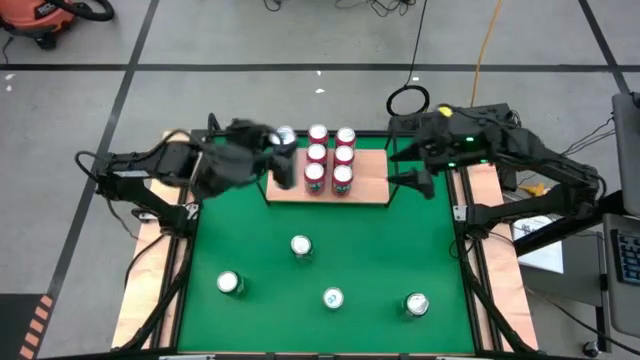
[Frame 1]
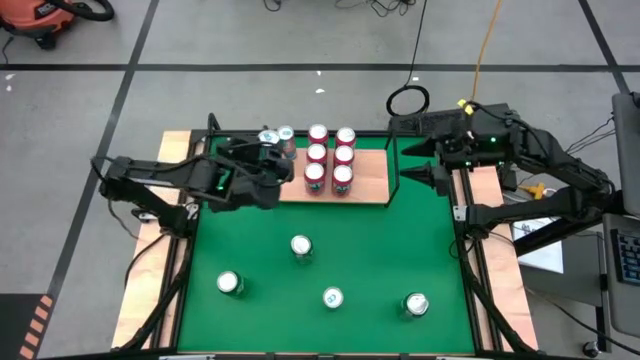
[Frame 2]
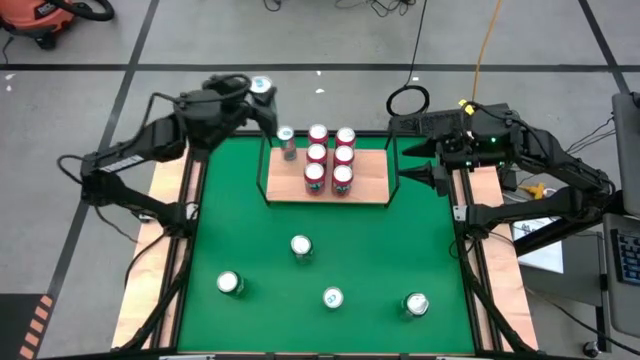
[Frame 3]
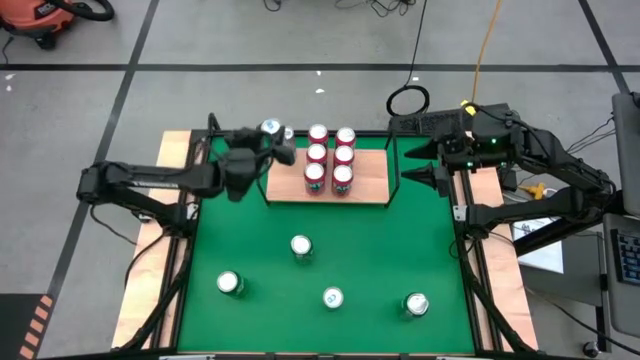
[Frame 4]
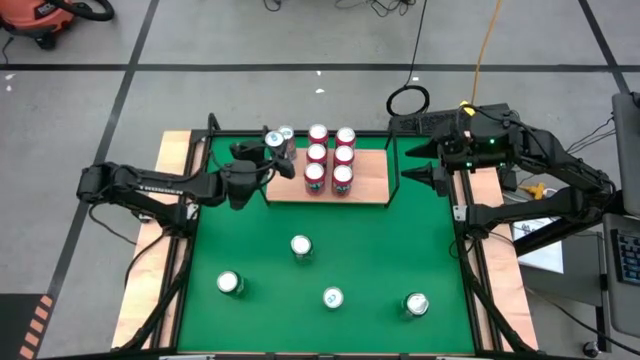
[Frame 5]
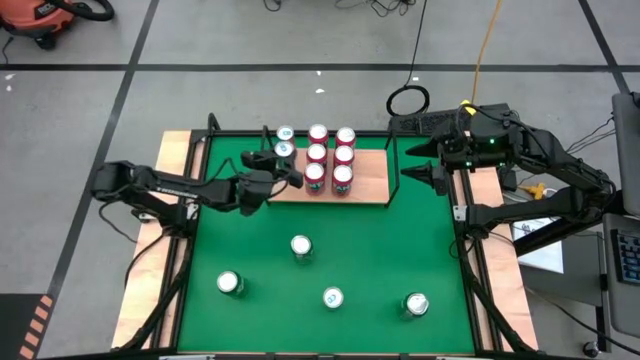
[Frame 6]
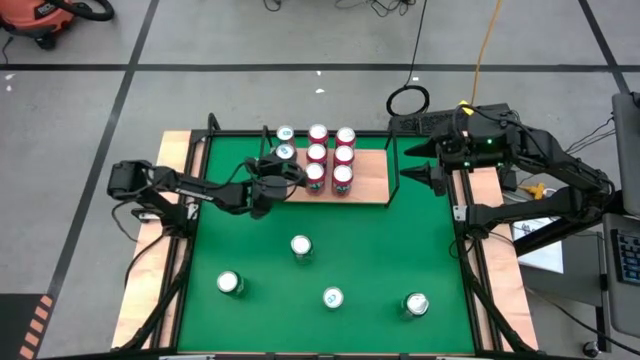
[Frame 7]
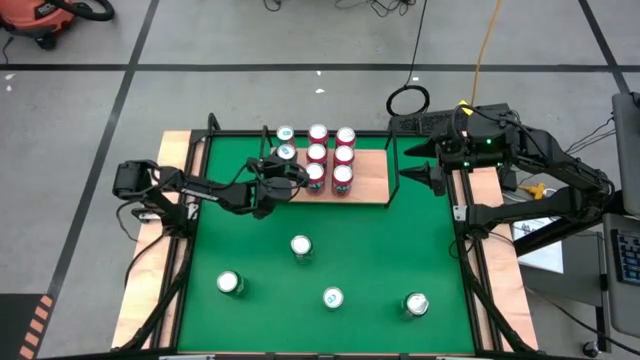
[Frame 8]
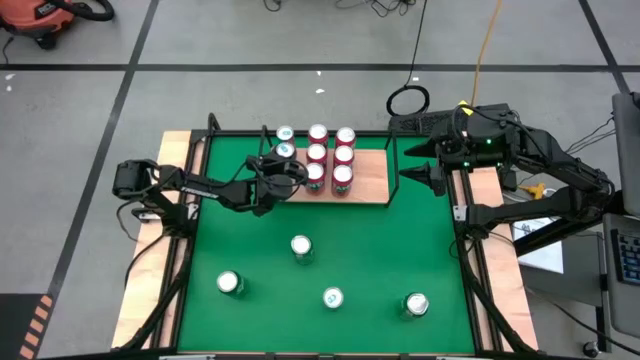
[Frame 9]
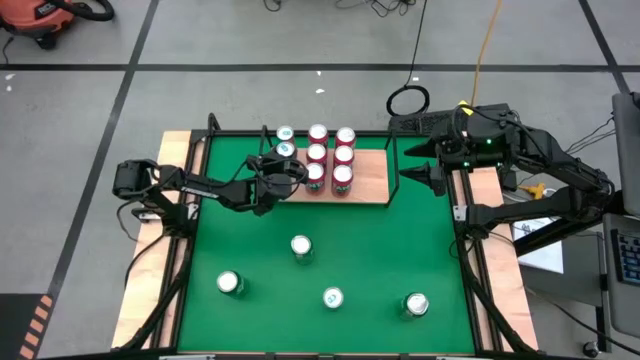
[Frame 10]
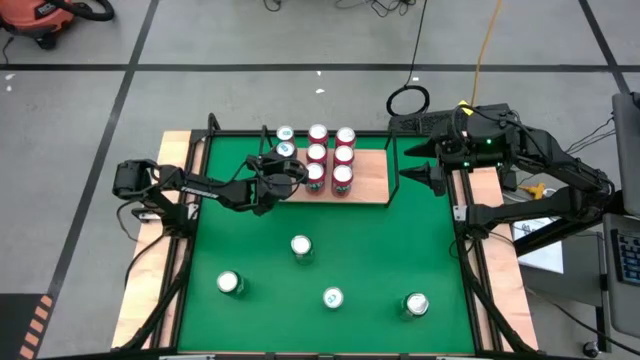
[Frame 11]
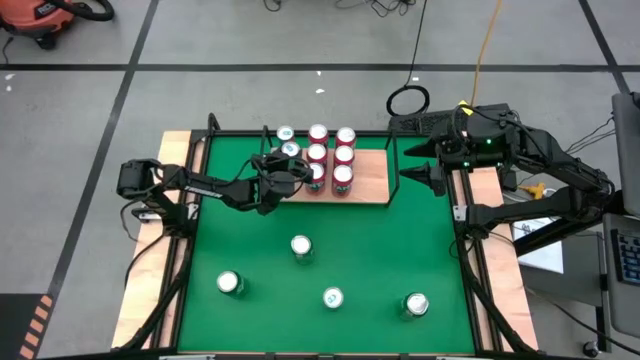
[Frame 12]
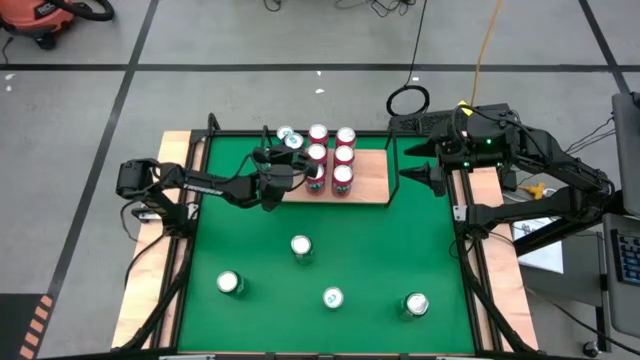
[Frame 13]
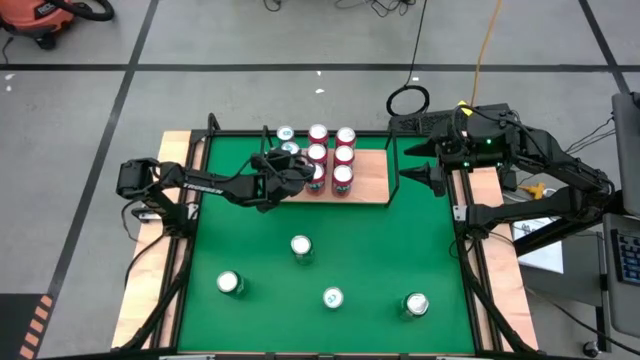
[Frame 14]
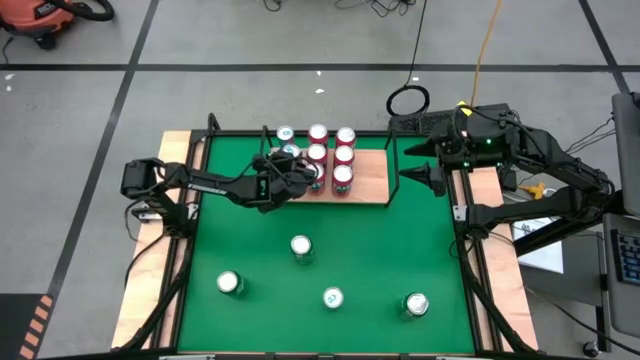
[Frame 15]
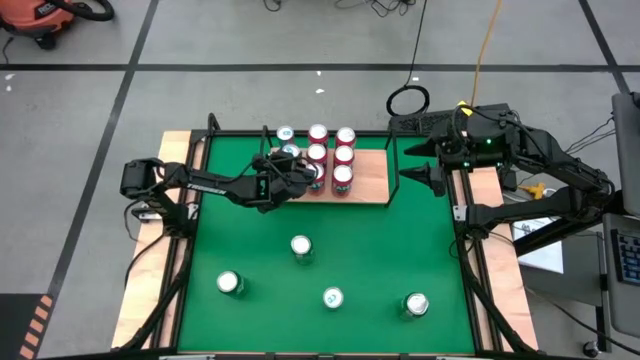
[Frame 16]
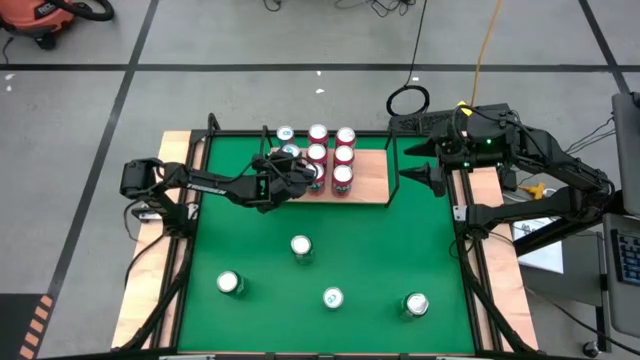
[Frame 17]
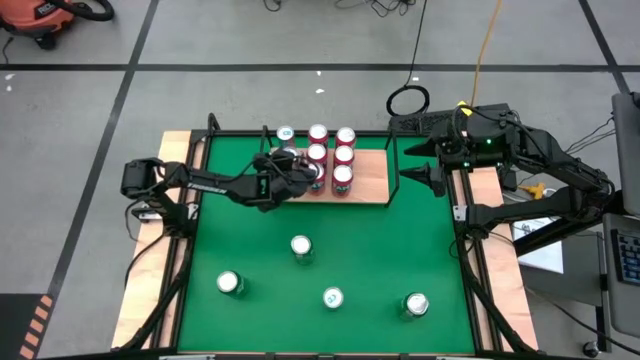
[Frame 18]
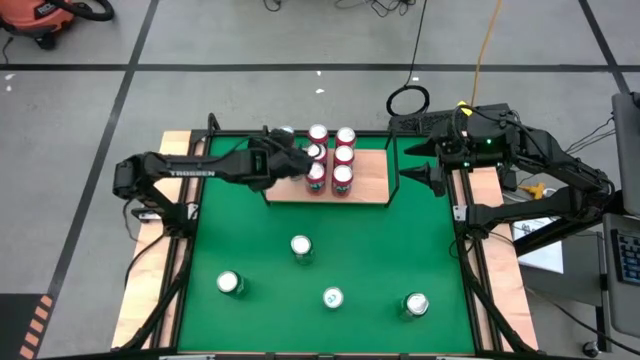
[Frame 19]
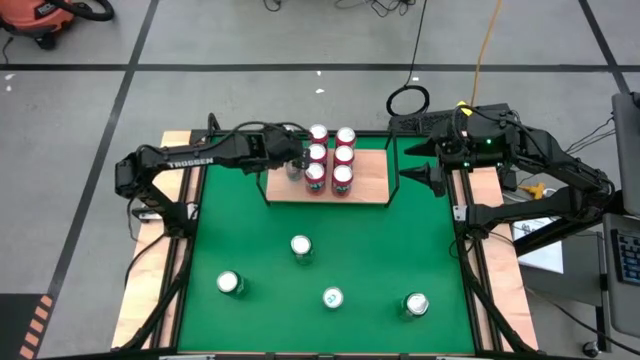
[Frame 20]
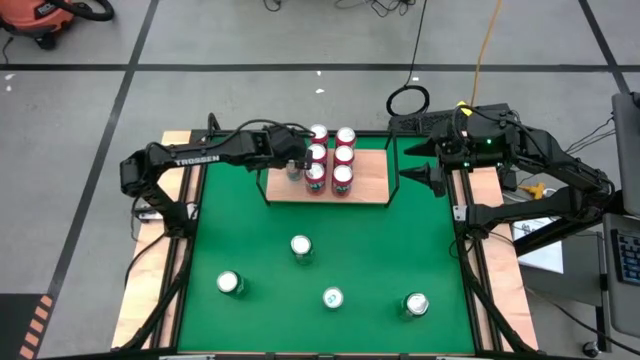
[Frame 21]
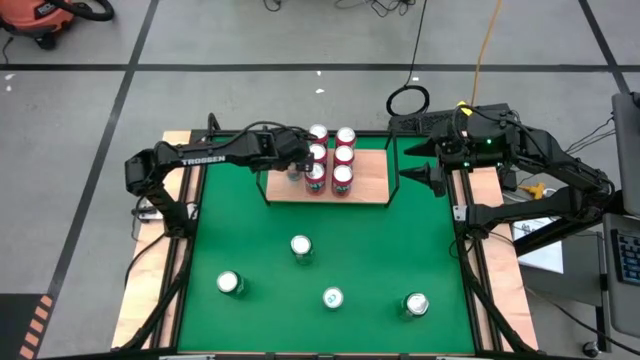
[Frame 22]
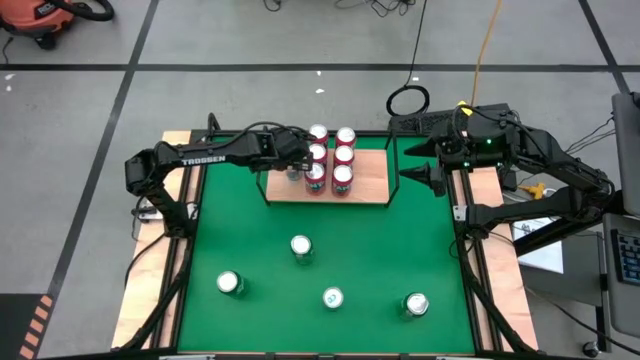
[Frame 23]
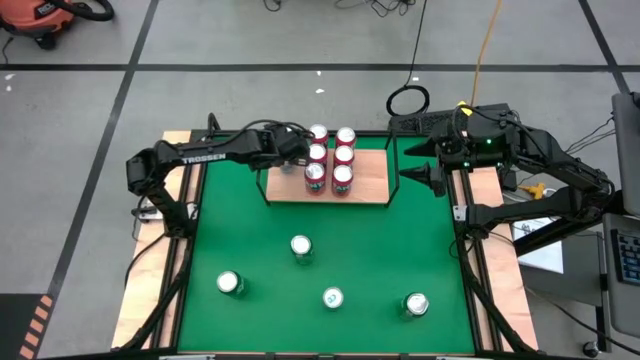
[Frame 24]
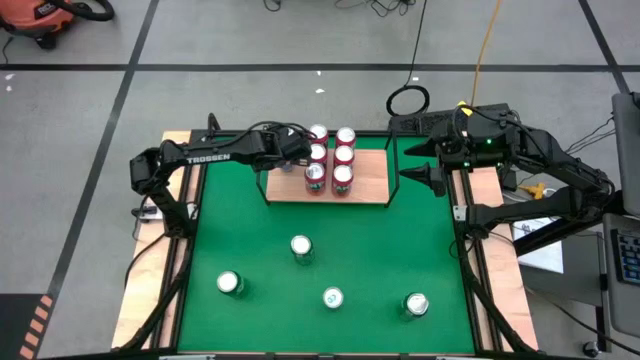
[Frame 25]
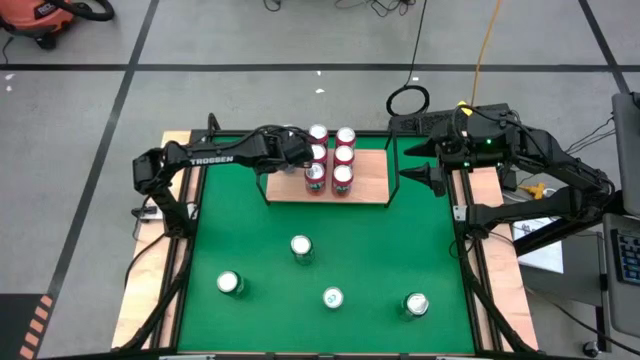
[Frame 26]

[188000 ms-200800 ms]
Task: Place canned beverage on shelf
Put the blue soda can on the shelf aligned with the other blue soda can

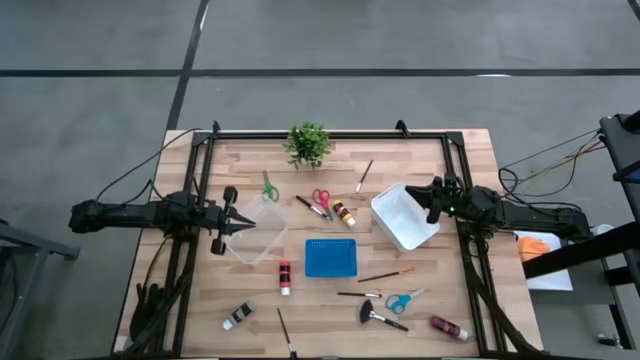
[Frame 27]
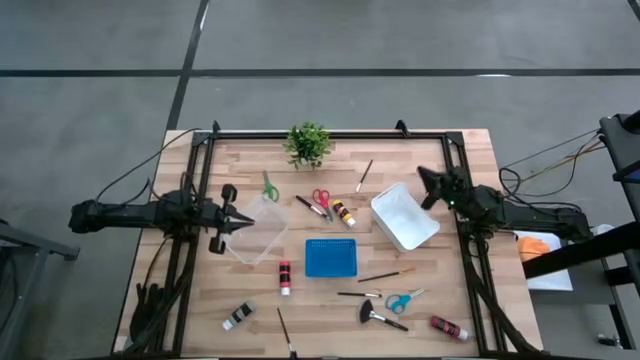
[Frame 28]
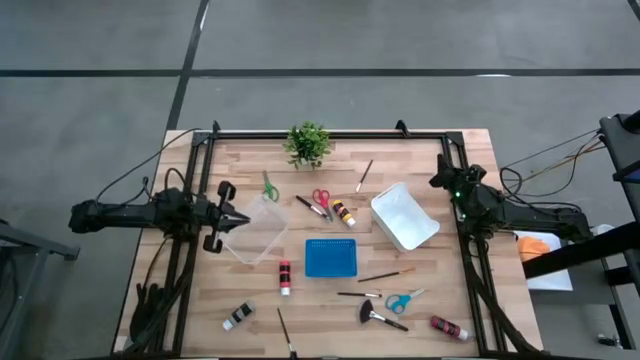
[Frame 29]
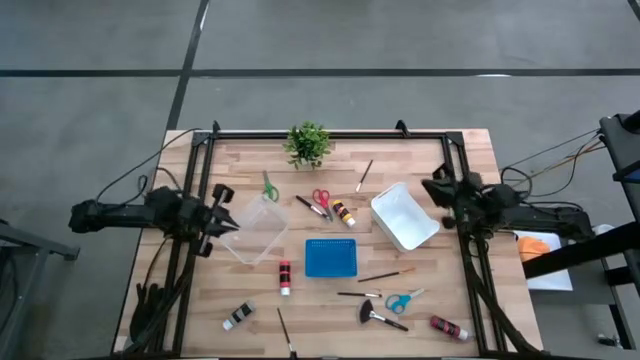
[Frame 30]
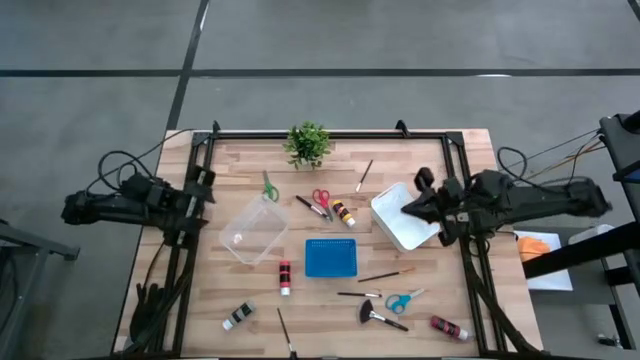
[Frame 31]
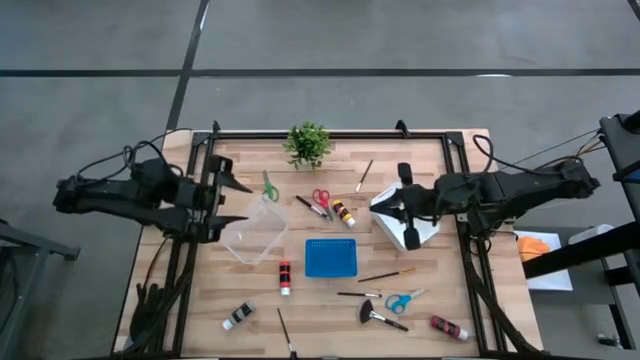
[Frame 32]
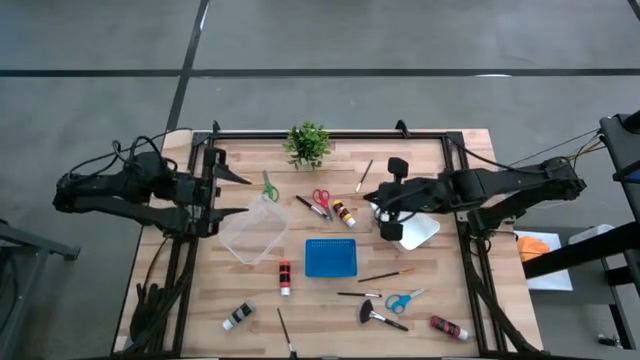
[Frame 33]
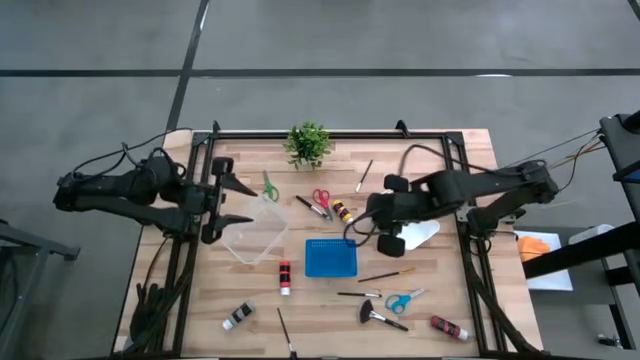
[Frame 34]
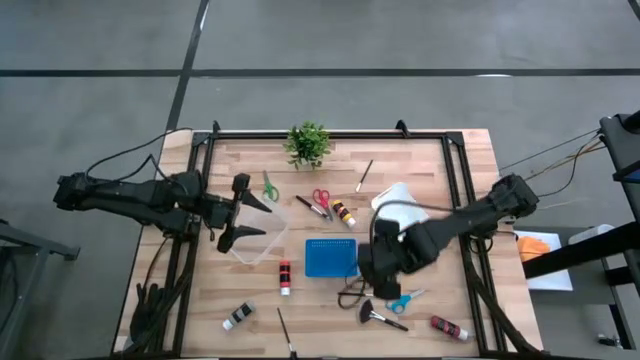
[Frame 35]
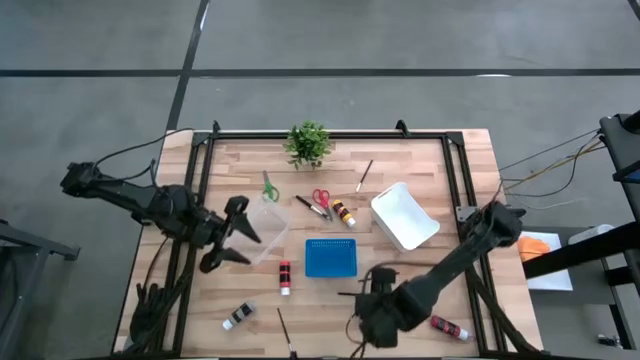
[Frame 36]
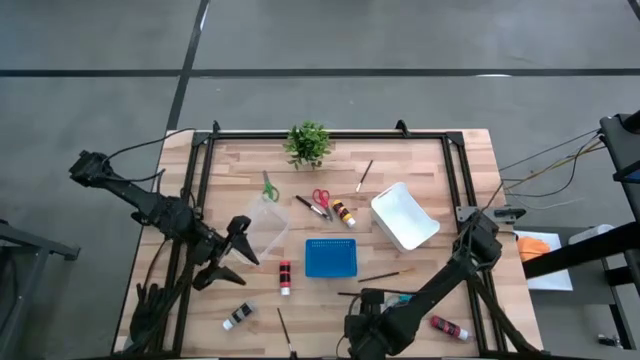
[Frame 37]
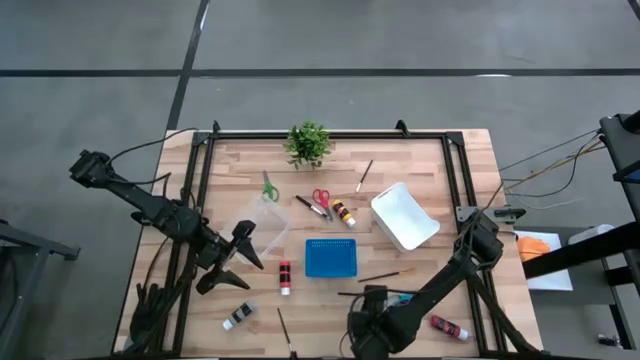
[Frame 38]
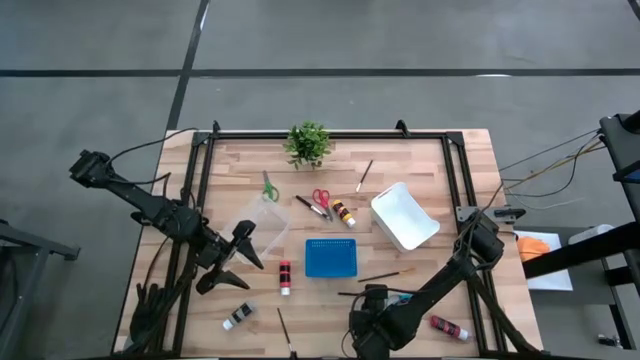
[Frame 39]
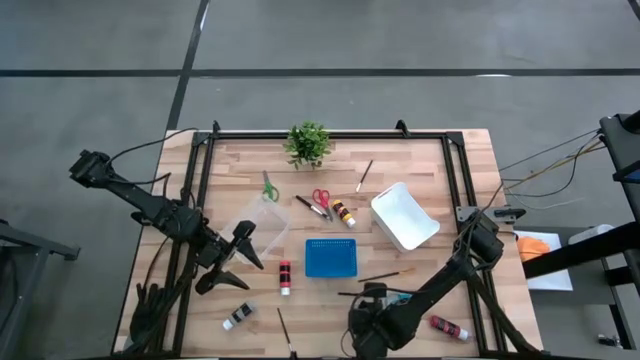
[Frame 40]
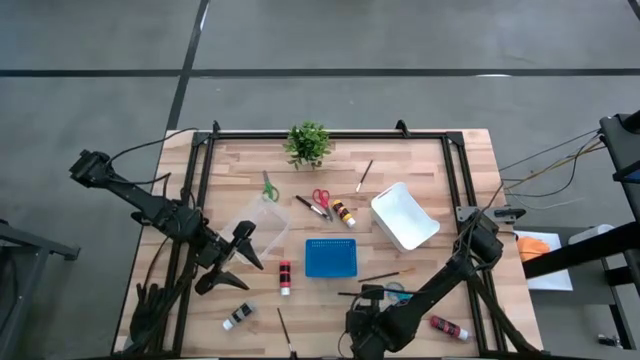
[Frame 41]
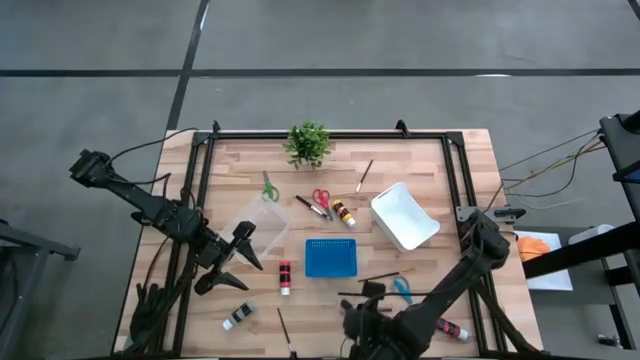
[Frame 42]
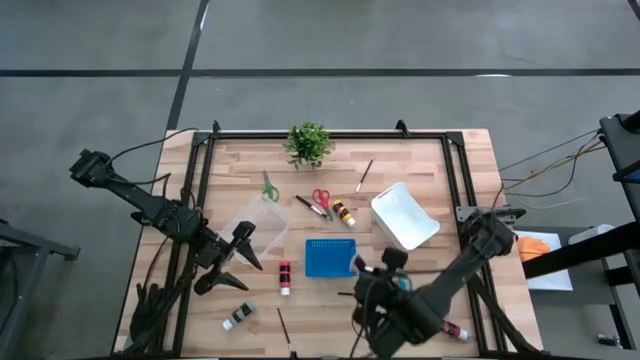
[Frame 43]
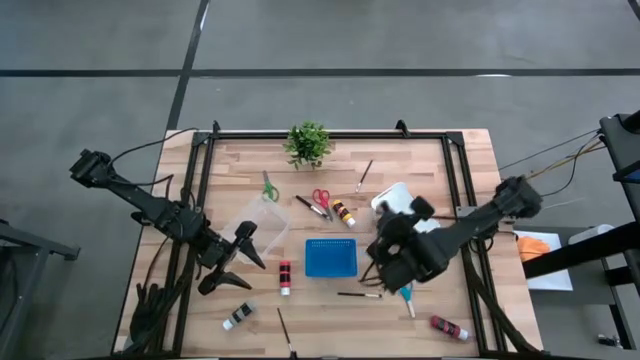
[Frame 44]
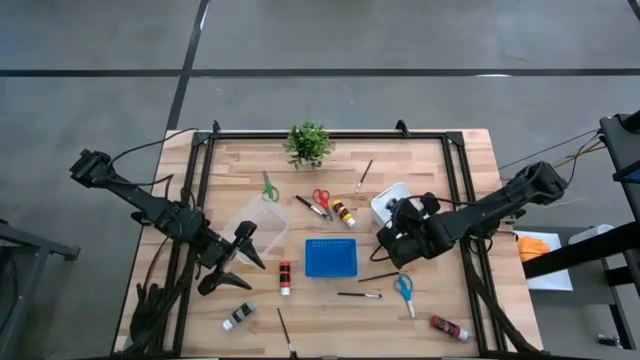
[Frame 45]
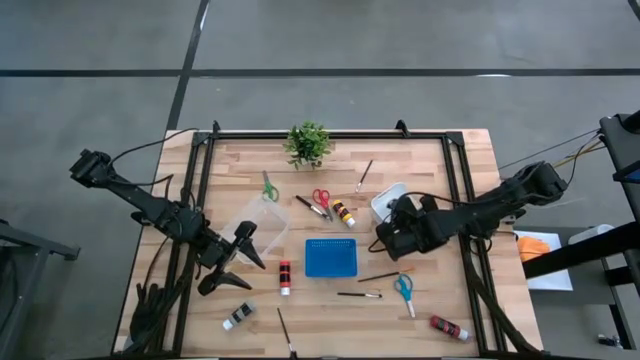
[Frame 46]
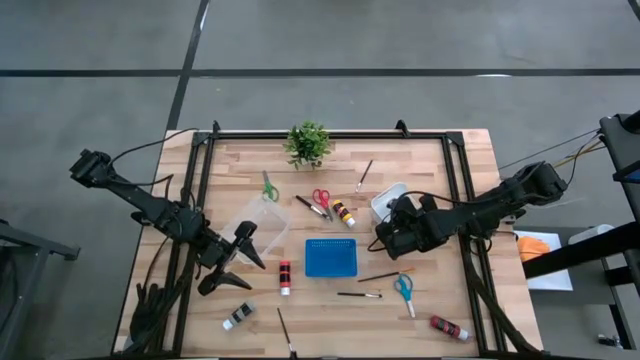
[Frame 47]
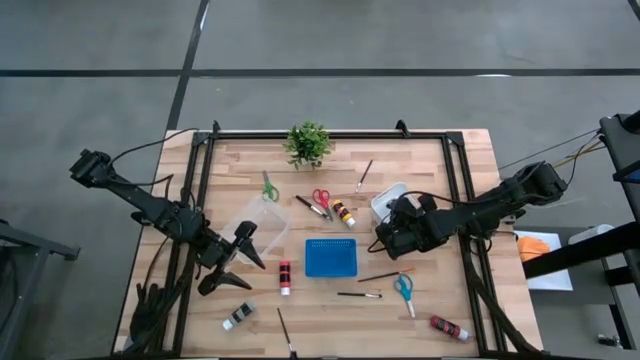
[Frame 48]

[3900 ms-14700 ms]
Task: Pick & Place Paint Supplies
Put the highlighter brush in the white bin
